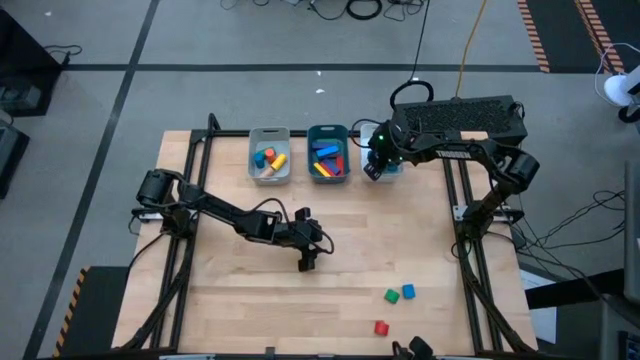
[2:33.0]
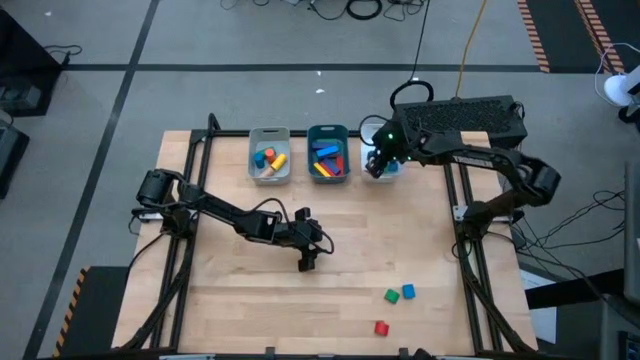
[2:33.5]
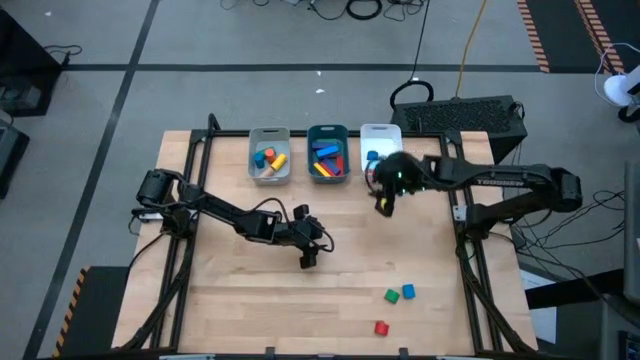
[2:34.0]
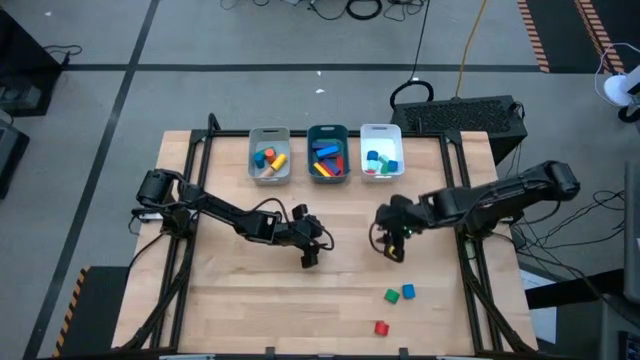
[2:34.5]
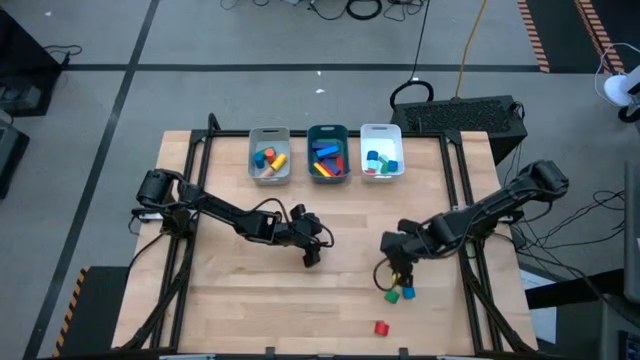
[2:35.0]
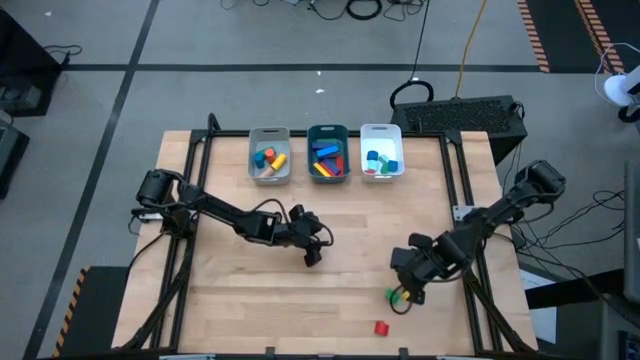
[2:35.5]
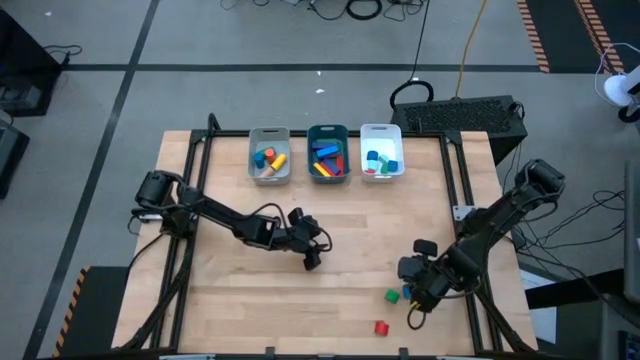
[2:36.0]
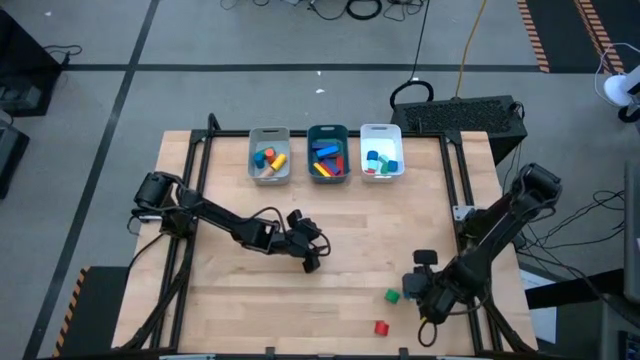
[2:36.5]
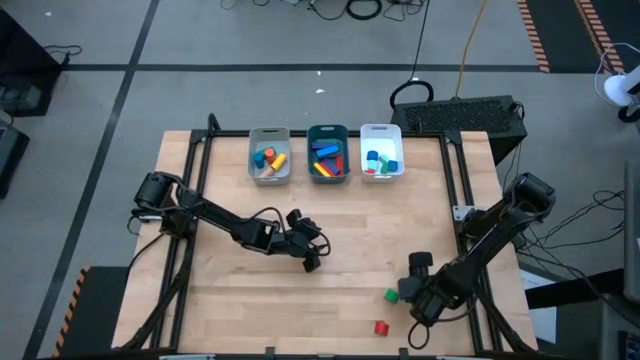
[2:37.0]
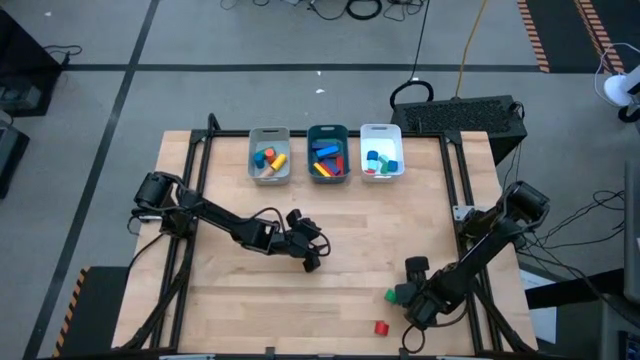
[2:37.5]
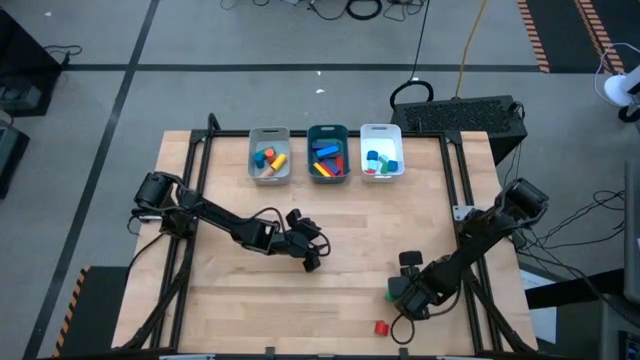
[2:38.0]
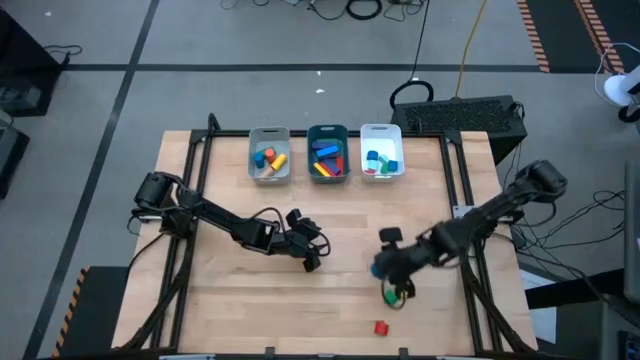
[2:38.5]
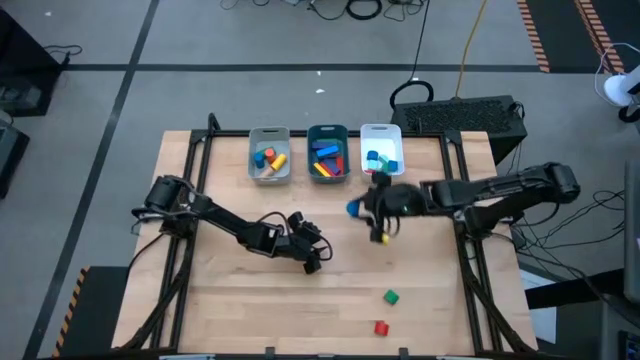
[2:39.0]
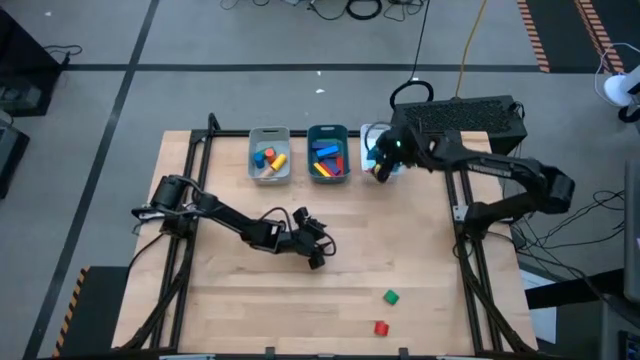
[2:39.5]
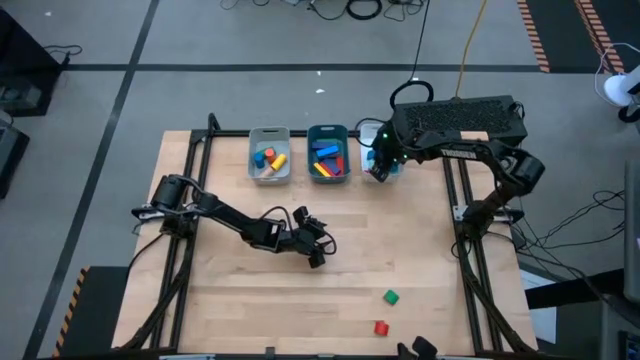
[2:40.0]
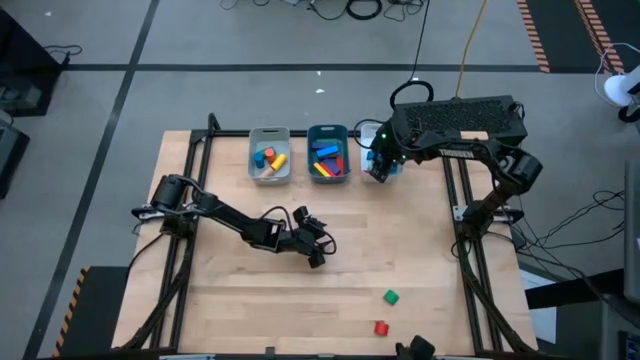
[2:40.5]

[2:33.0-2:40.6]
Task: Sort blocks by size
Put the blue half-circle block into the white bin

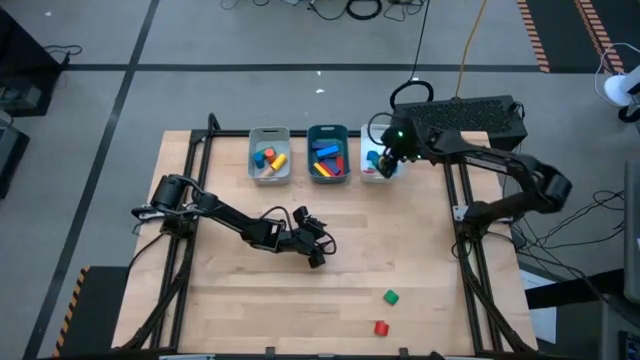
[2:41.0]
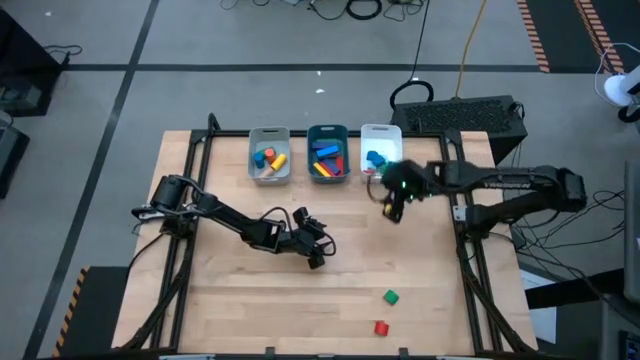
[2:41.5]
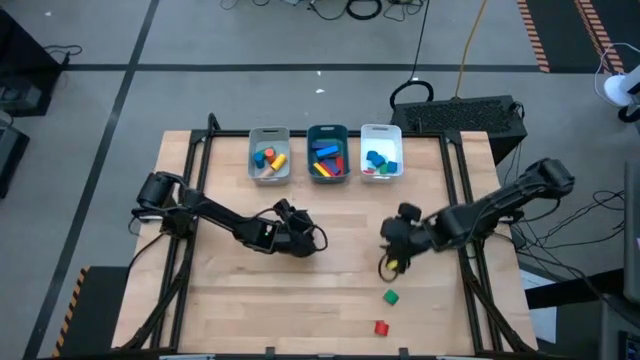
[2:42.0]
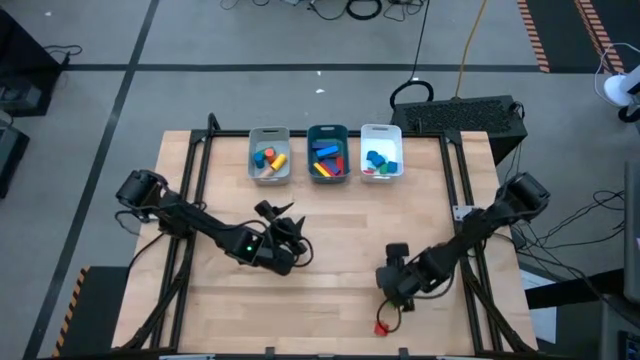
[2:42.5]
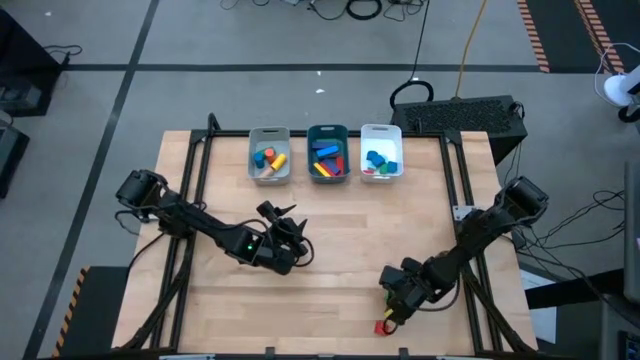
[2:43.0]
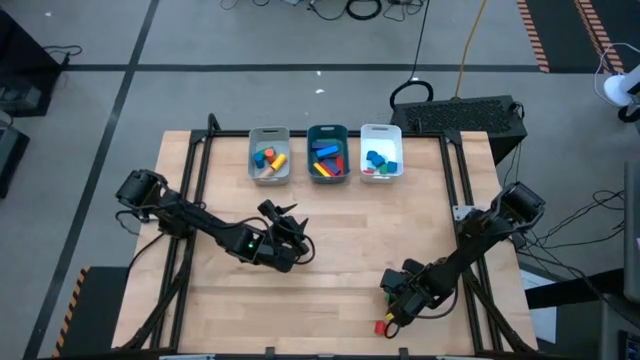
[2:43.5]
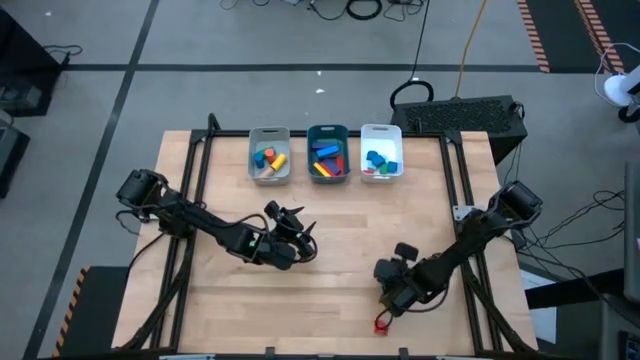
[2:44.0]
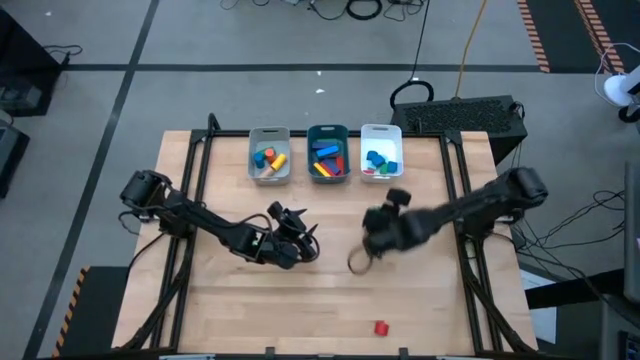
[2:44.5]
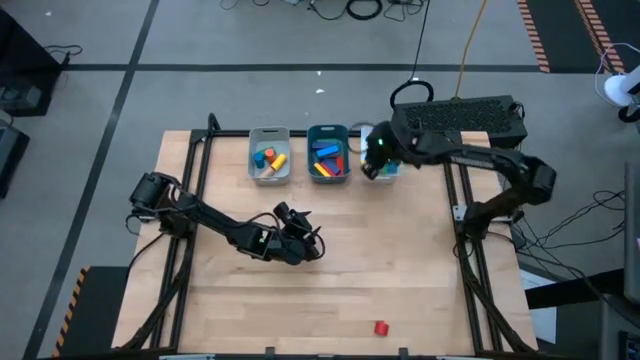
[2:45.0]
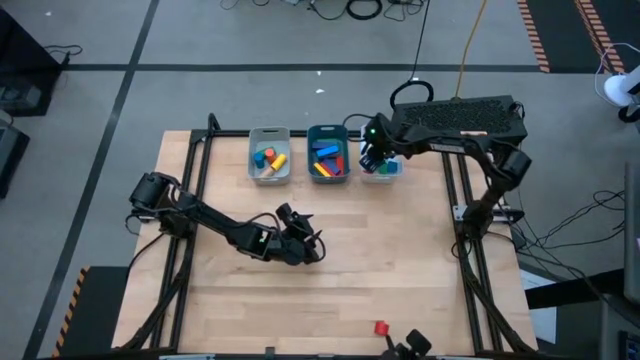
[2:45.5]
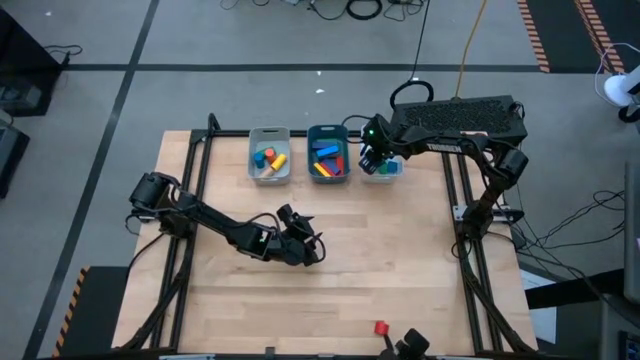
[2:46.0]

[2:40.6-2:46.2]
Put the green half-circle block into the white bin

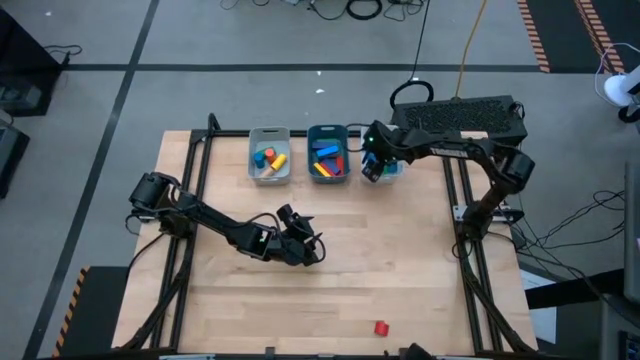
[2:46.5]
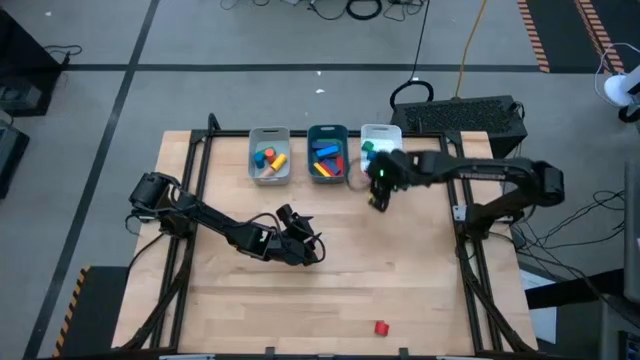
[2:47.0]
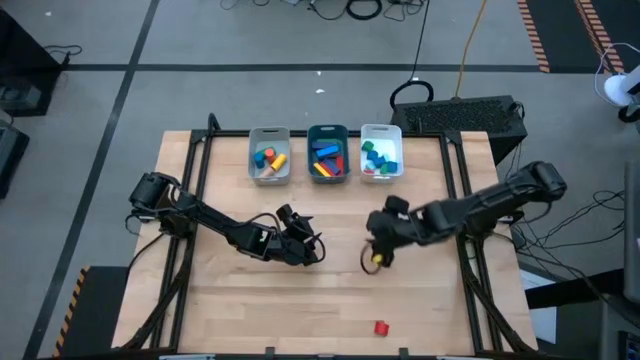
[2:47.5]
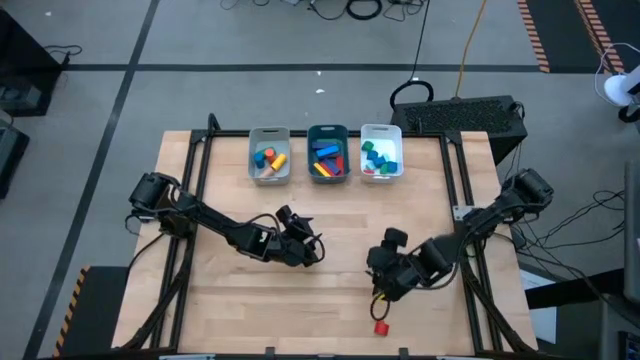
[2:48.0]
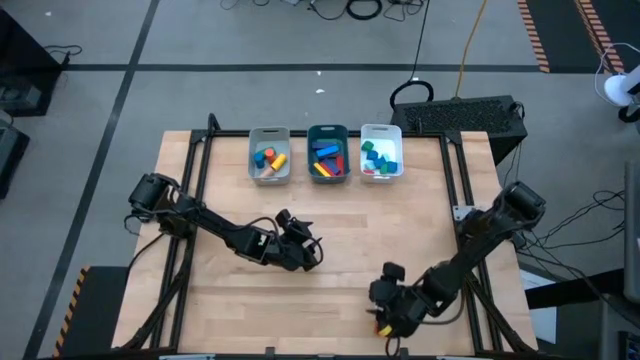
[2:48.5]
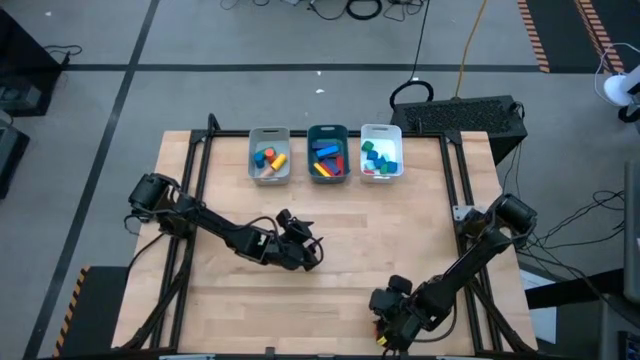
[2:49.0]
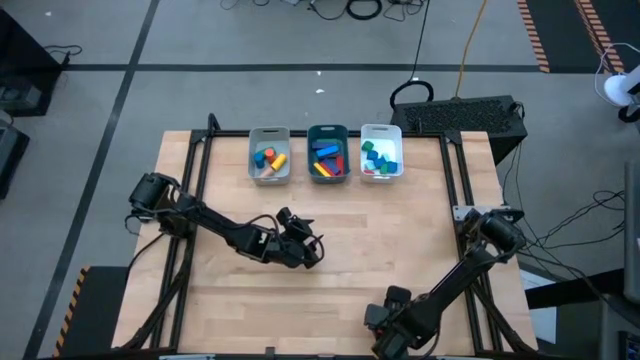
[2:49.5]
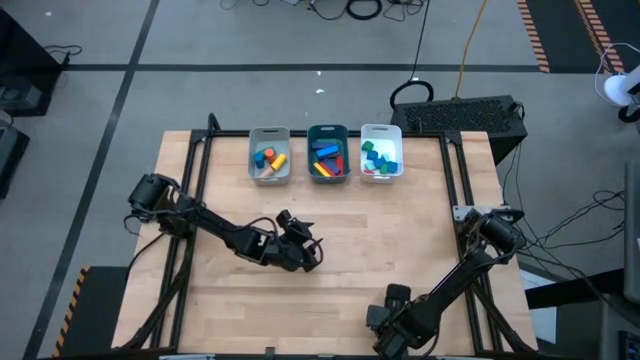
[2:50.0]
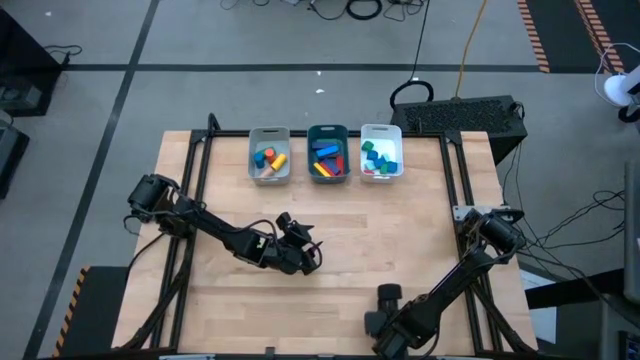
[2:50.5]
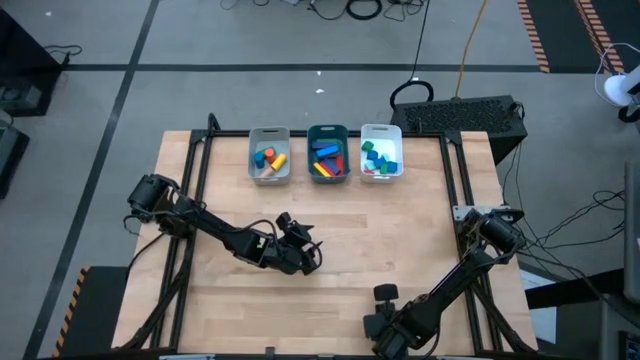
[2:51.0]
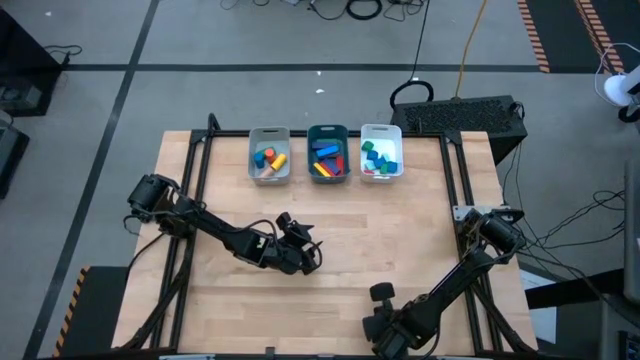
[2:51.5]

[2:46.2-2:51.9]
Put the red half-circle block into the white bin

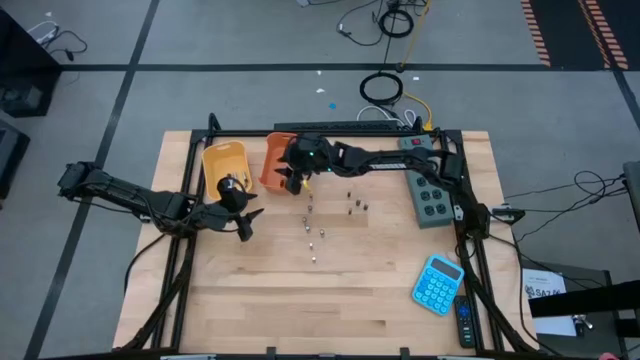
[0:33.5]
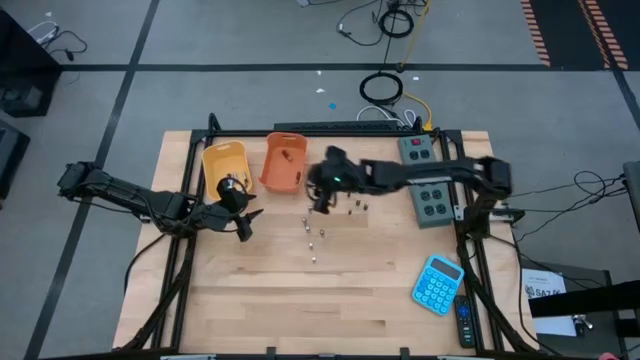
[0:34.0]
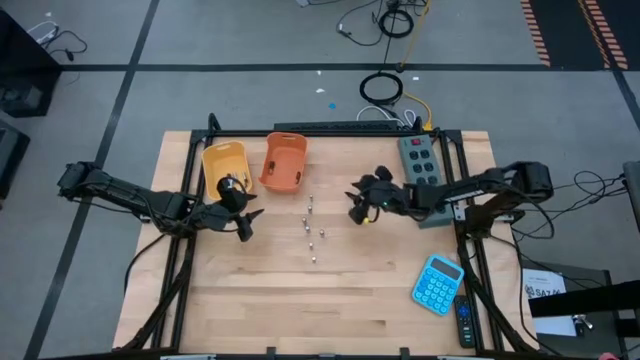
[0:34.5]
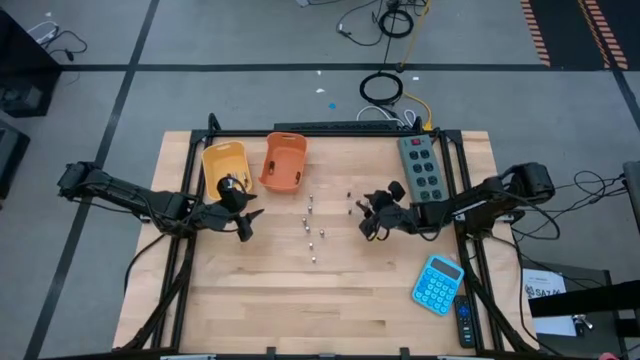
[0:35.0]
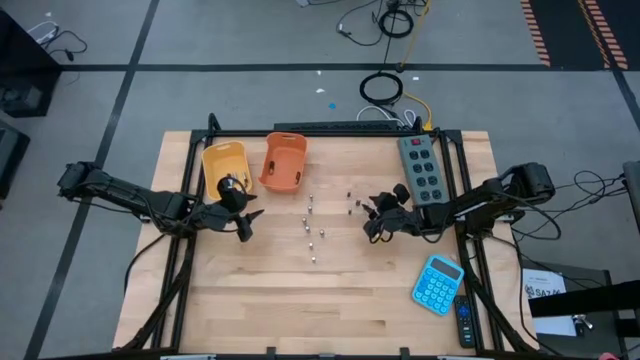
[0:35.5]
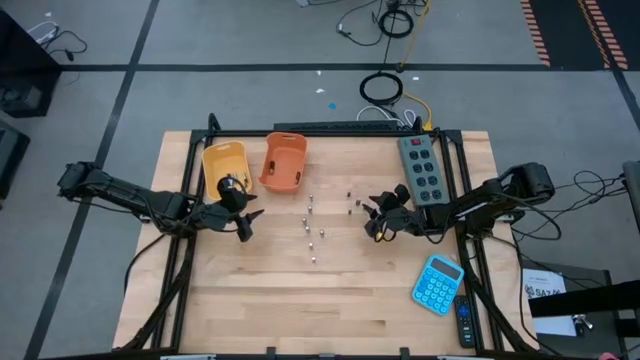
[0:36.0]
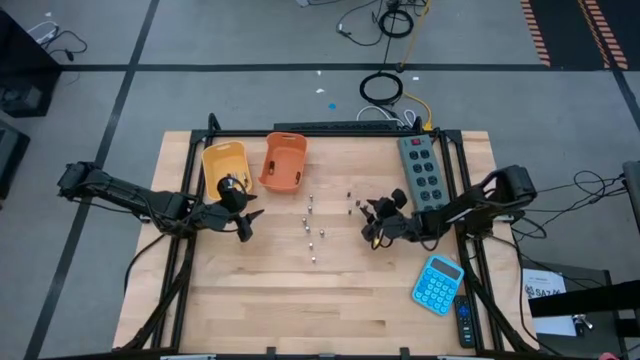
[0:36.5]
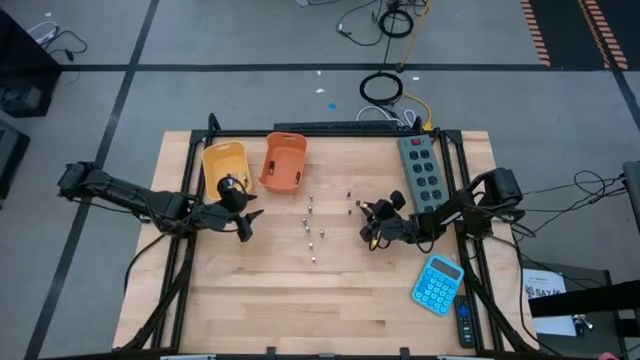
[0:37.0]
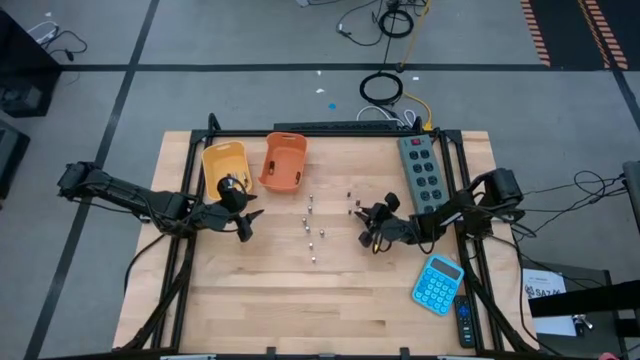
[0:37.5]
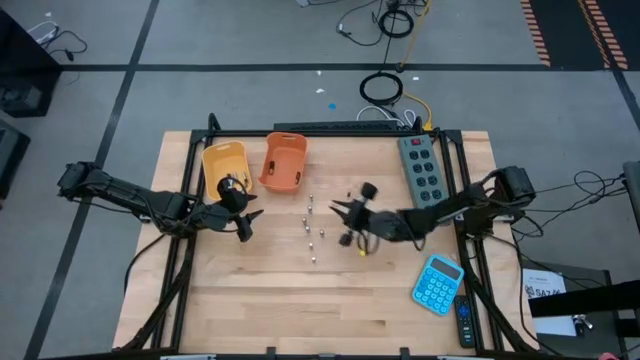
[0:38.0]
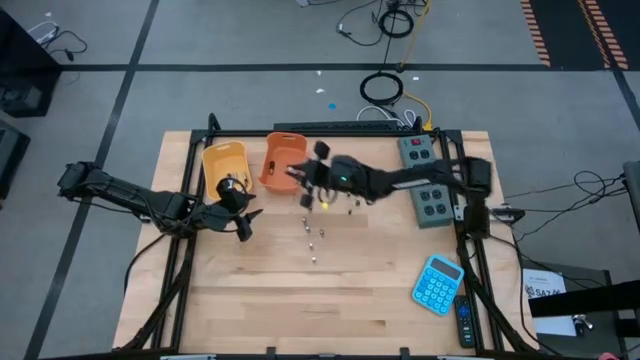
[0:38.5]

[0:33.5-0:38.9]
Task: Sort batteries
Put the black battery into the orange bin
